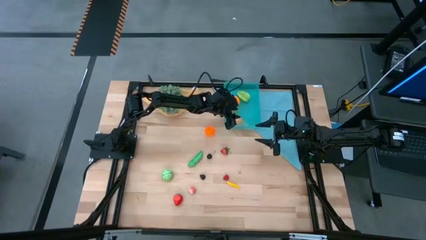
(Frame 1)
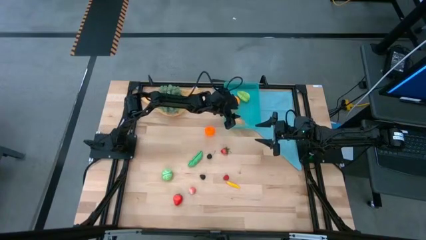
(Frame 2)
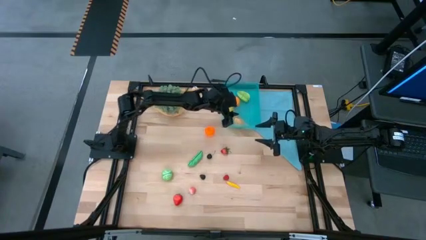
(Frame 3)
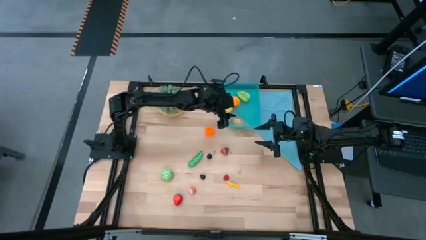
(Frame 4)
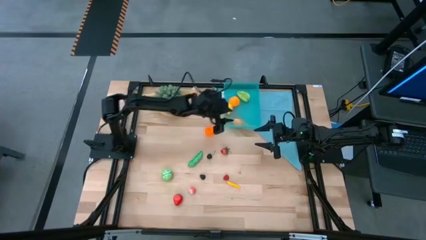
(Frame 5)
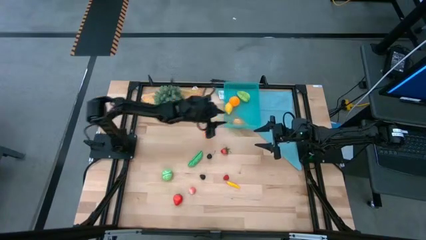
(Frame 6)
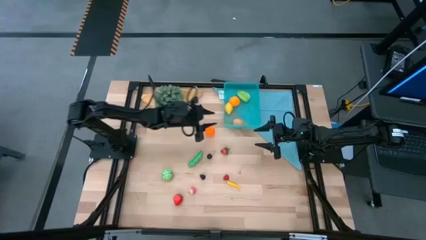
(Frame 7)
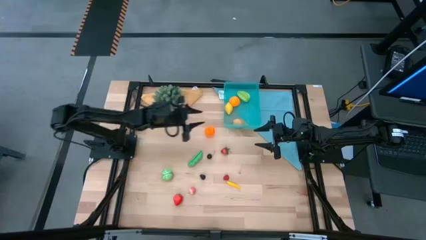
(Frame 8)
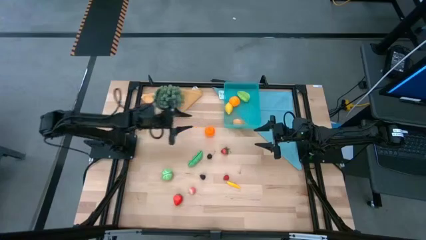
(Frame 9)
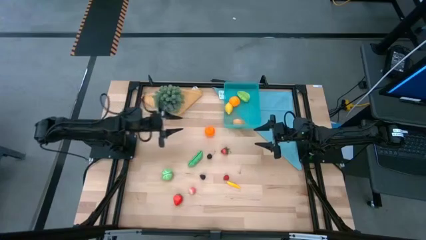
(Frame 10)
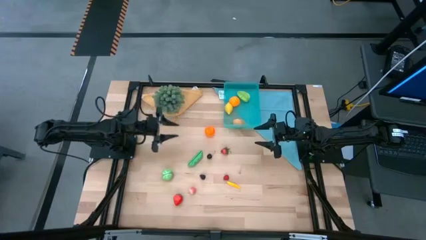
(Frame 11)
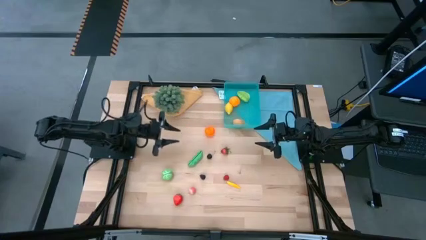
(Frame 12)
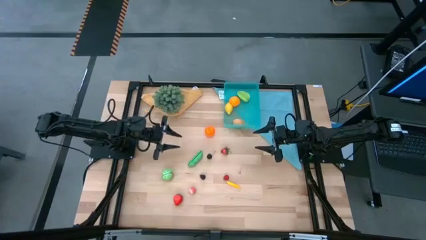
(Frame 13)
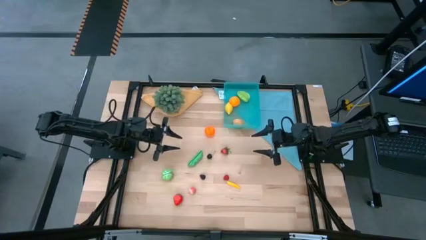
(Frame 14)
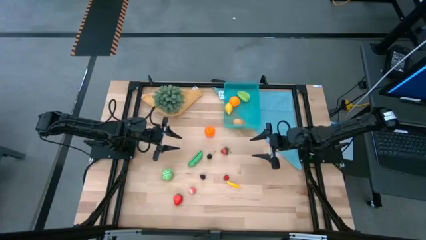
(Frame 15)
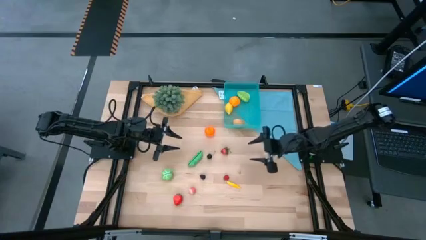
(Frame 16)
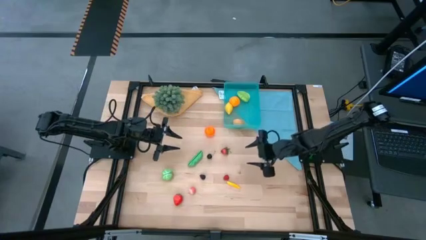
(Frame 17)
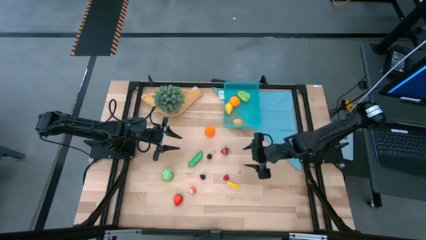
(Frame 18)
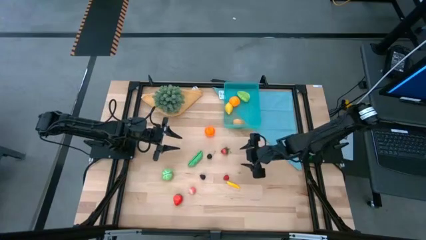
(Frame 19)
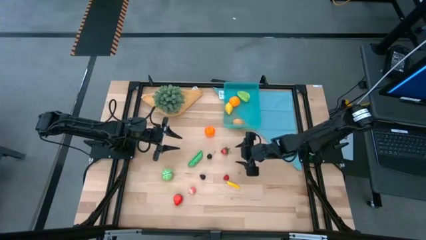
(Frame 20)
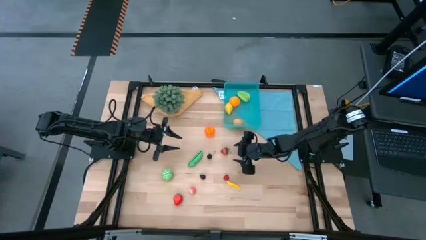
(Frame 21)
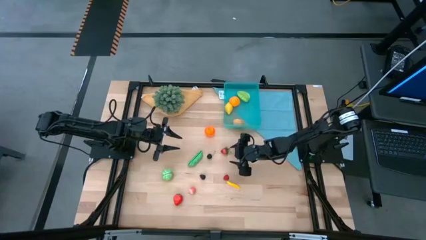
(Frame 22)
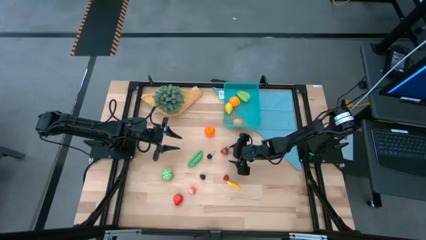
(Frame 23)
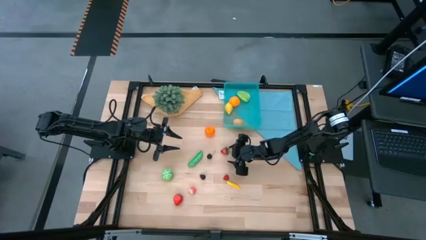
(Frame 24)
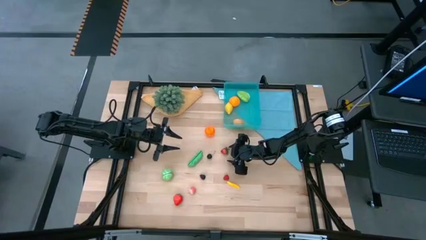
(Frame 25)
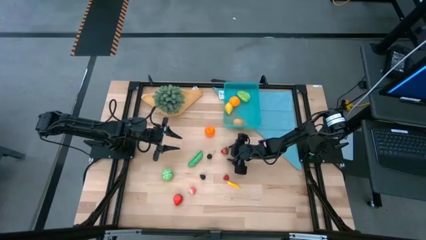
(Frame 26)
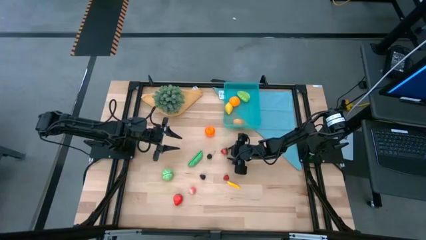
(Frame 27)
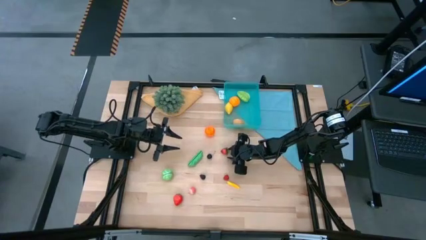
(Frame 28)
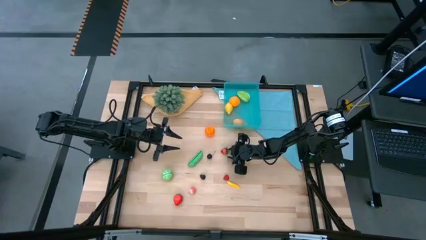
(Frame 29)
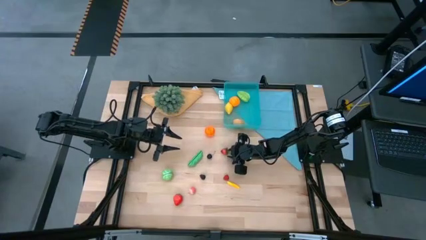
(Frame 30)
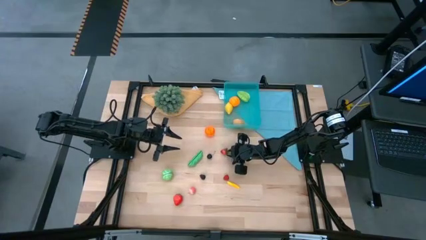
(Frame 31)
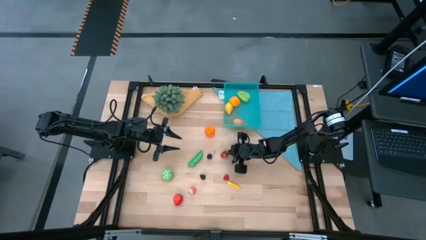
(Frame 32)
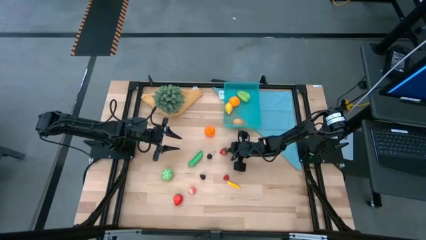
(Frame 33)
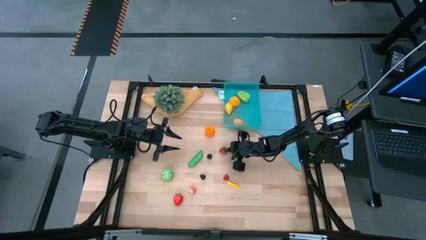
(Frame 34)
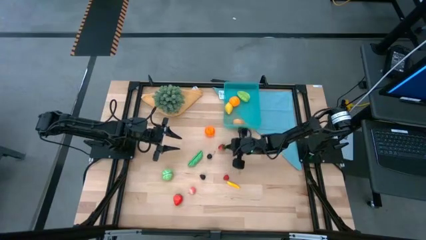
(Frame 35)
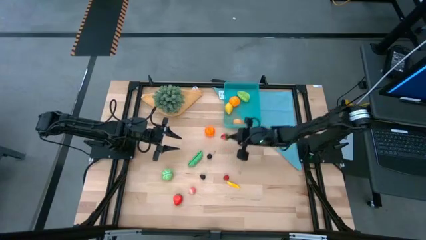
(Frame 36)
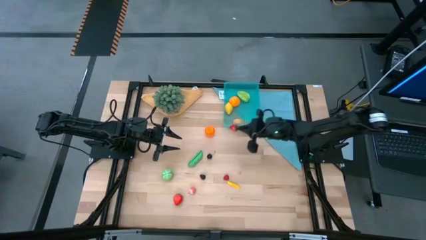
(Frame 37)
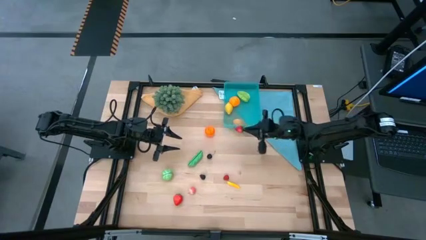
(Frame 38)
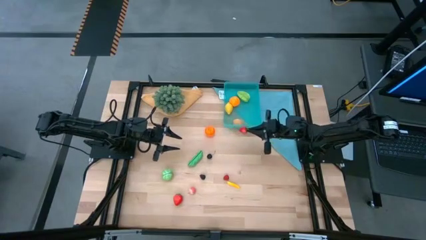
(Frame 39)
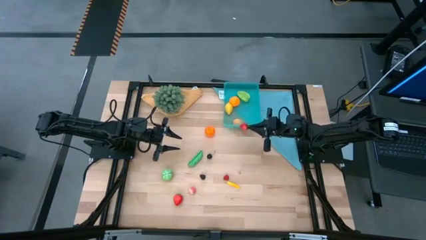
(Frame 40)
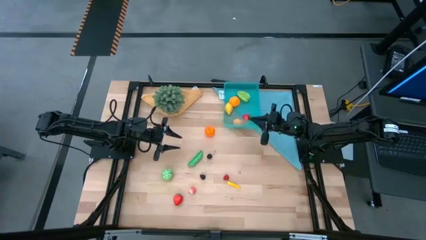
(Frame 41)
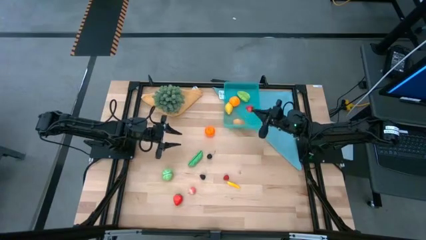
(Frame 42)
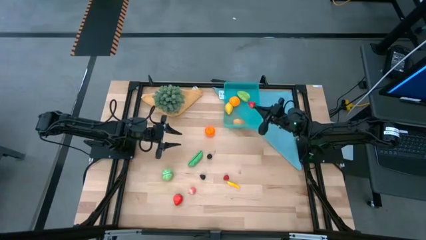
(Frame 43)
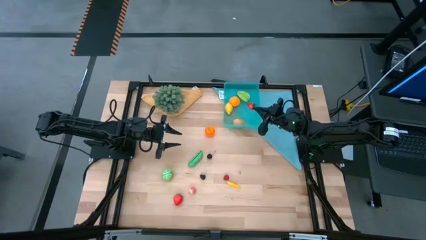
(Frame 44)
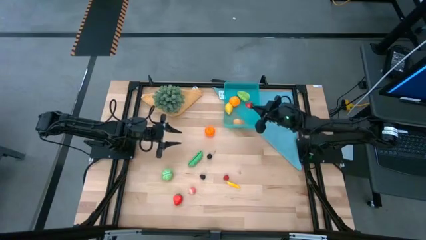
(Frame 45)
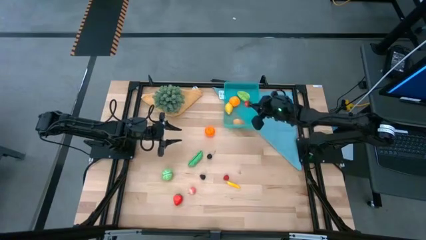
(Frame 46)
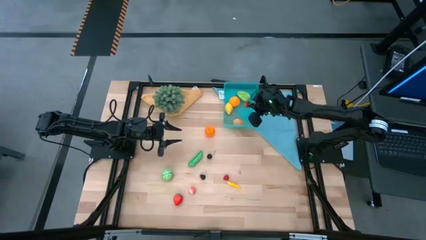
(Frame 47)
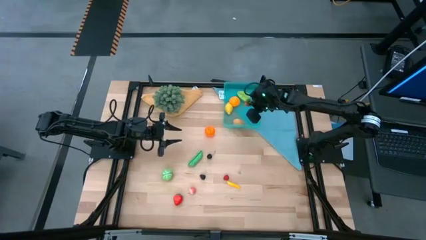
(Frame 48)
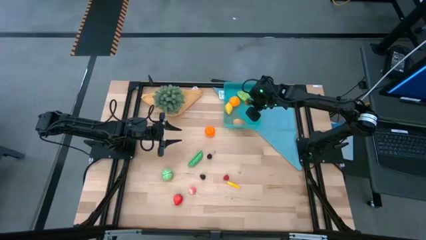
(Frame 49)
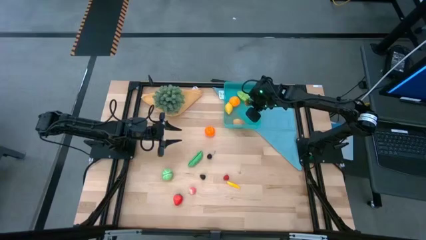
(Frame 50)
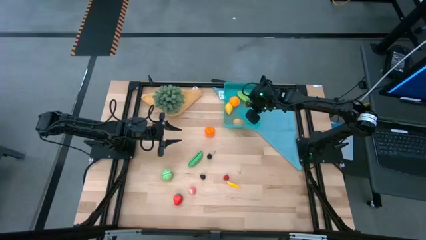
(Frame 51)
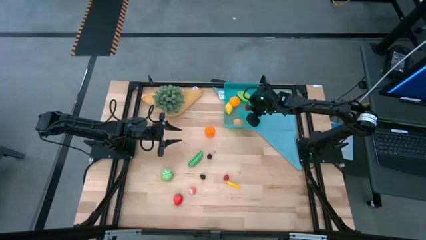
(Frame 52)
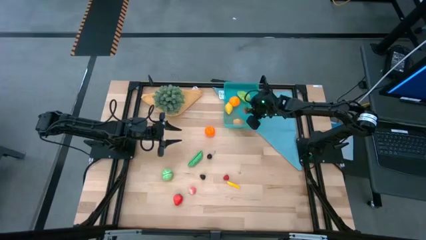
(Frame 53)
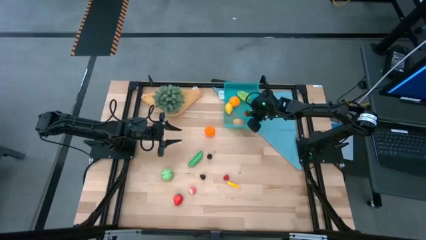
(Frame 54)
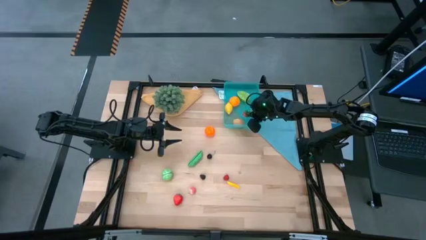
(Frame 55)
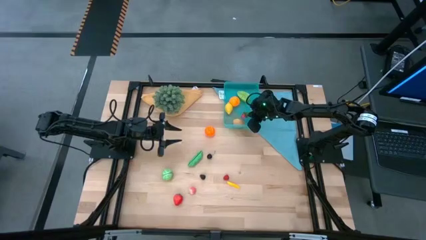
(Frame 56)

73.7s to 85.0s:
Task: Pick and placing Produce into tupperware
Put the top red strawberry into the blue bin

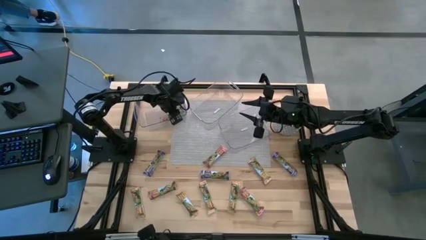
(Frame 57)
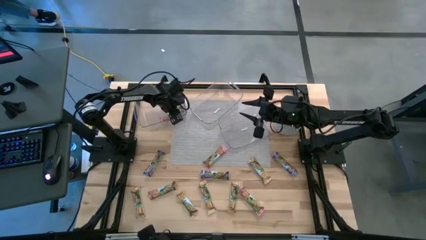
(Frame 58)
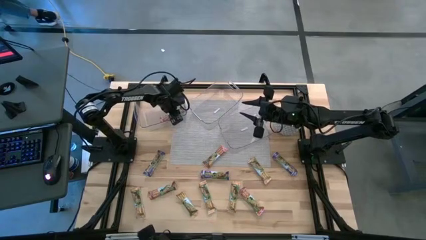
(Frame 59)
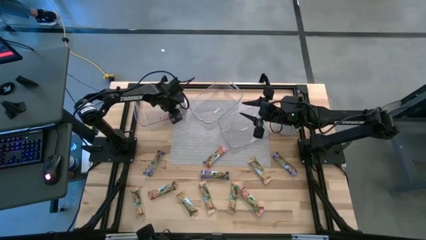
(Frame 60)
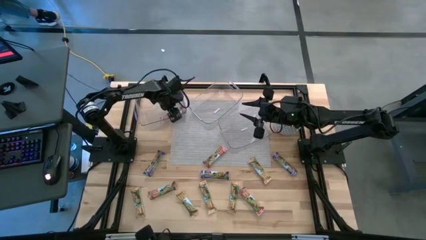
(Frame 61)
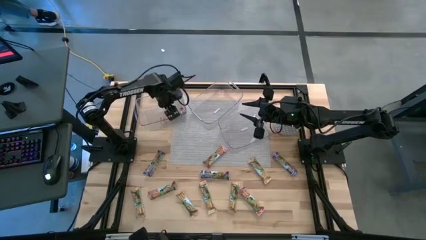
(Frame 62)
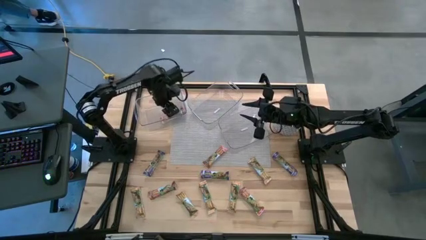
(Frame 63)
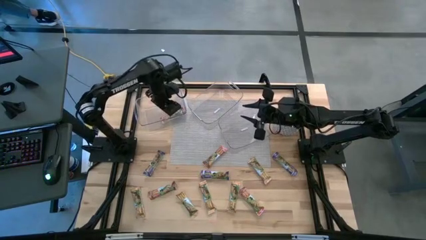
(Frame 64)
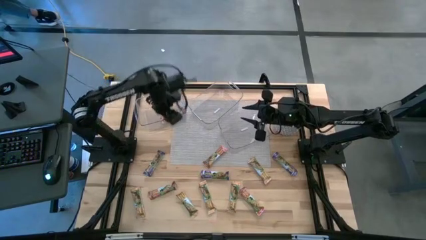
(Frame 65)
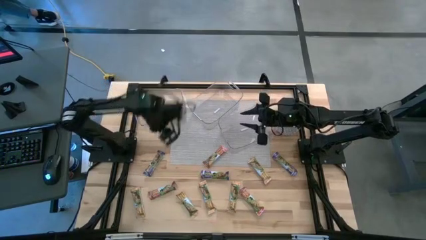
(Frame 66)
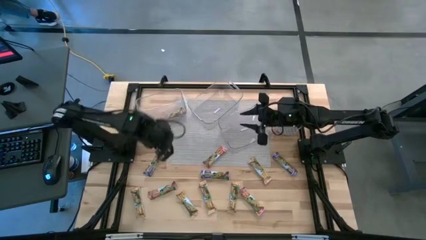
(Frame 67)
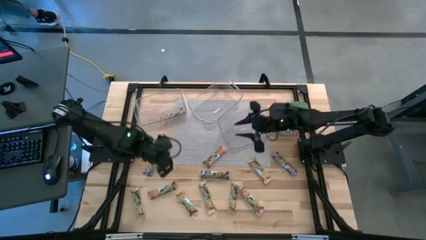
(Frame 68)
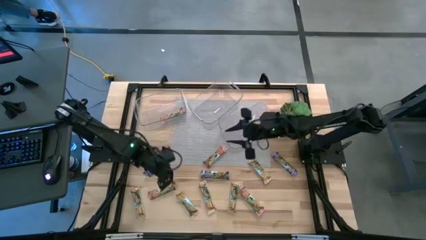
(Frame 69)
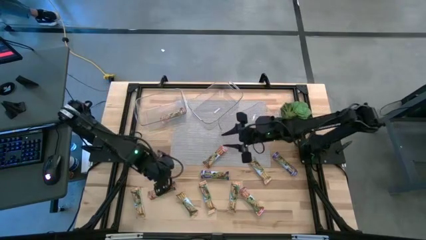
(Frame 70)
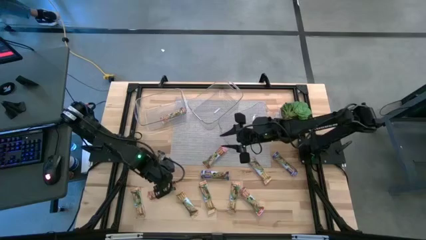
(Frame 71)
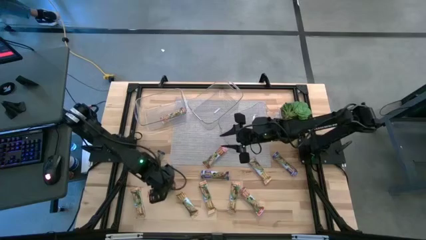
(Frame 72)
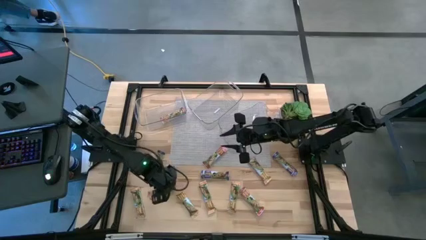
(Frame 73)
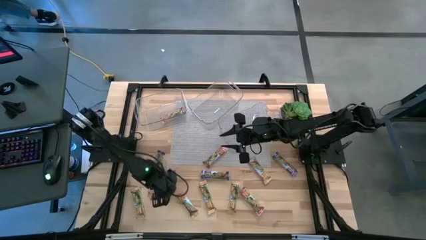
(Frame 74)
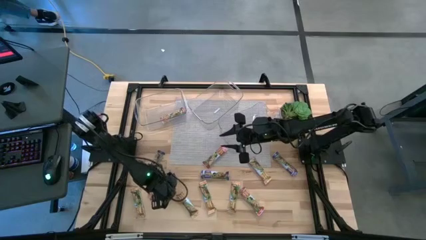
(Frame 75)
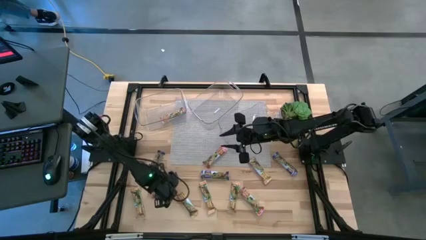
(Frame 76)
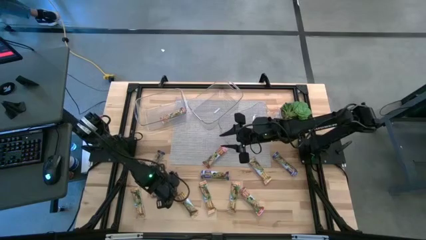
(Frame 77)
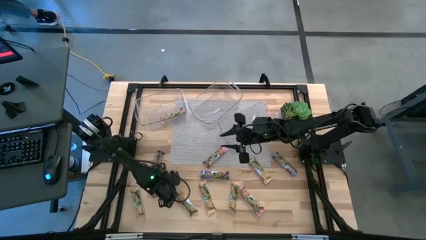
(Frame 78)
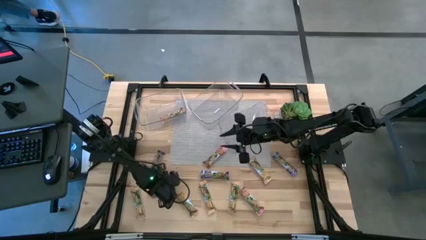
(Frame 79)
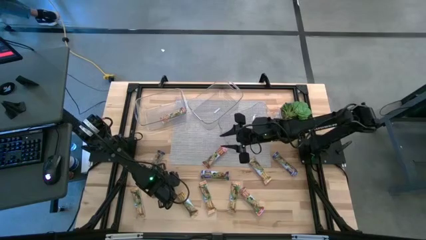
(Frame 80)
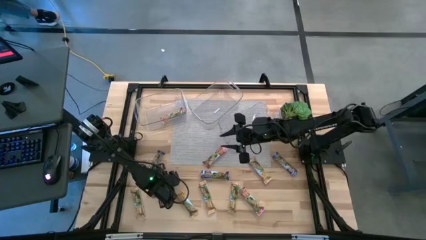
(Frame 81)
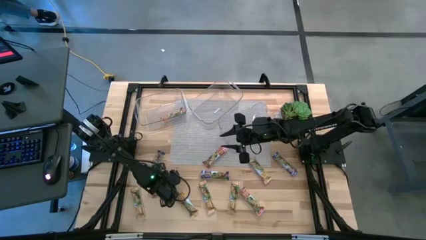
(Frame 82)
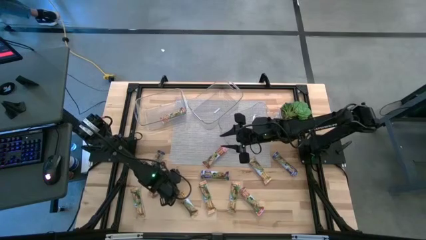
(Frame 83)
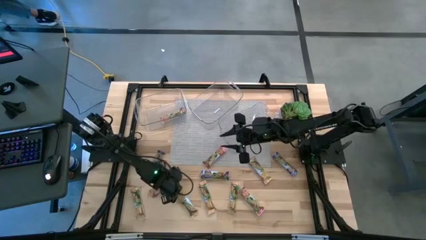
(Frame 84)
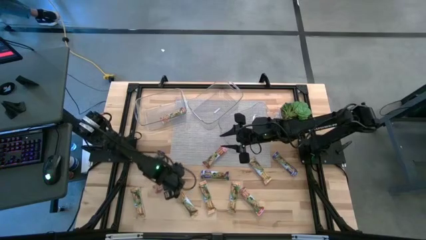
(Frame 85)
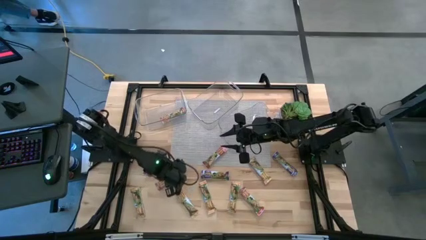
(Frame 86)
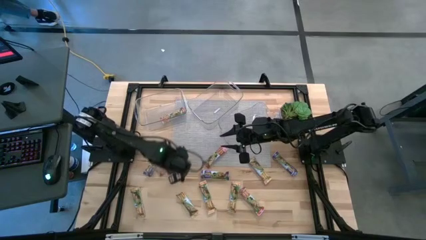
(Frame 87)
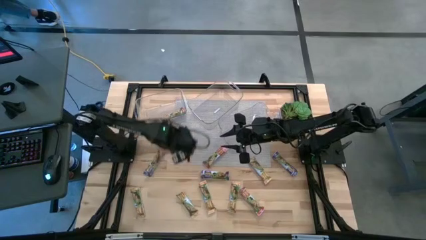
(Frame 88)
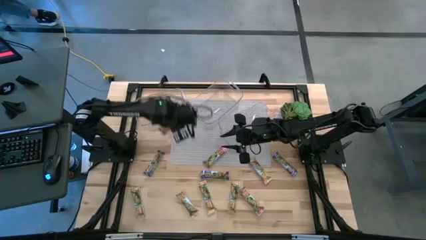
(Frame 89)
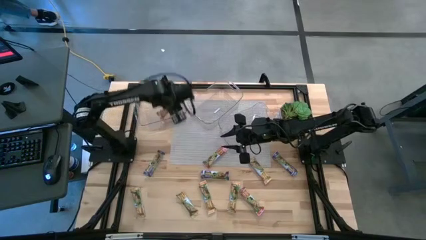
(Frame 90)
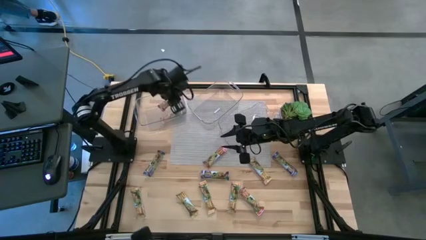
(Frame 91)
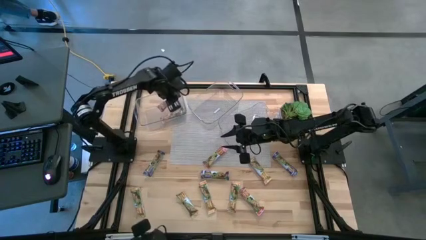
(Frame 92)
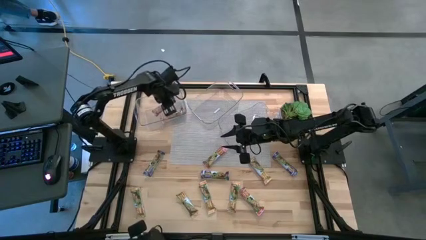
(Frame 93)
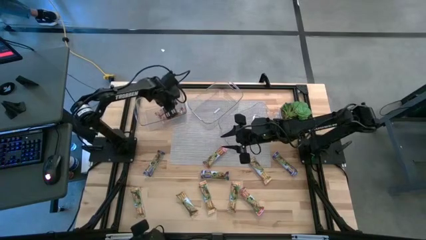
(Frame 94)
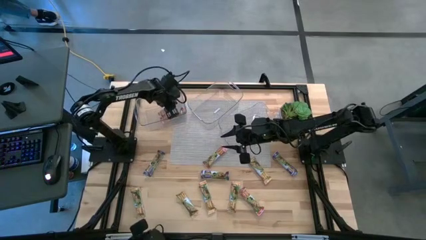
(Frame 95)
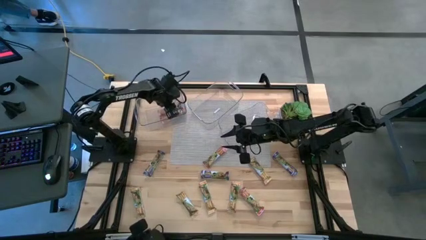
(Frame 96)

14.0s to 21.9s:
Task: Pick and place Granola Bars by type
Put the red granola bar into the left transparent bin
